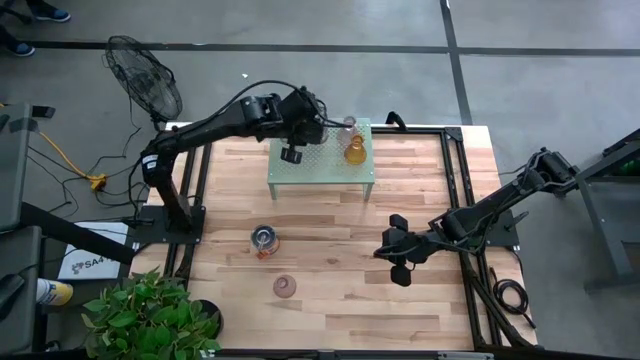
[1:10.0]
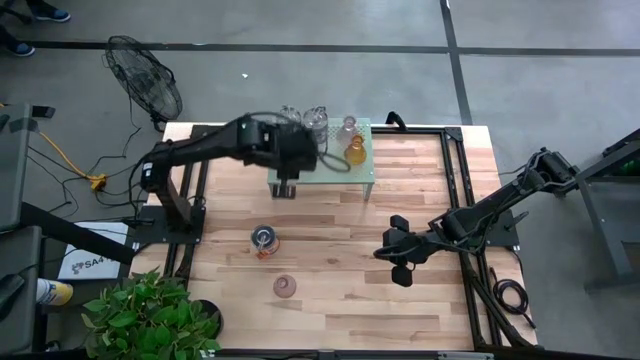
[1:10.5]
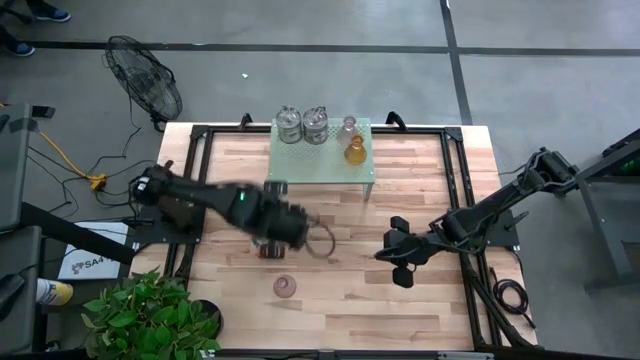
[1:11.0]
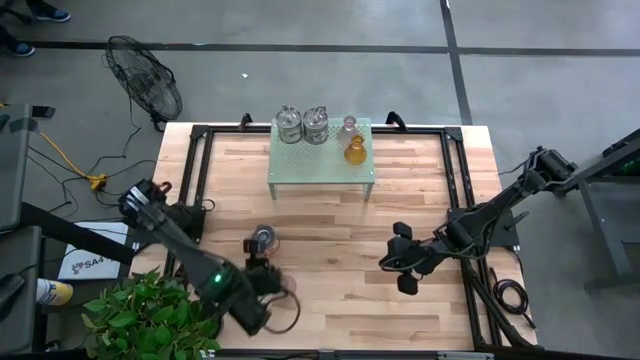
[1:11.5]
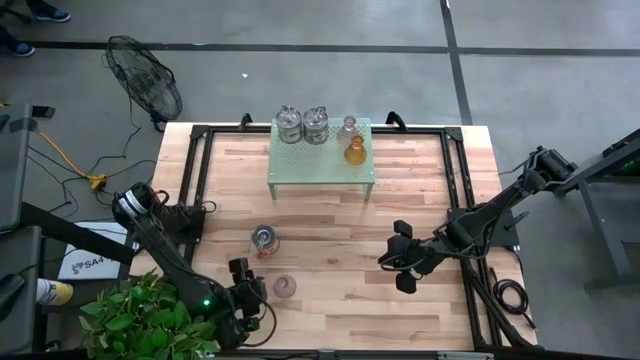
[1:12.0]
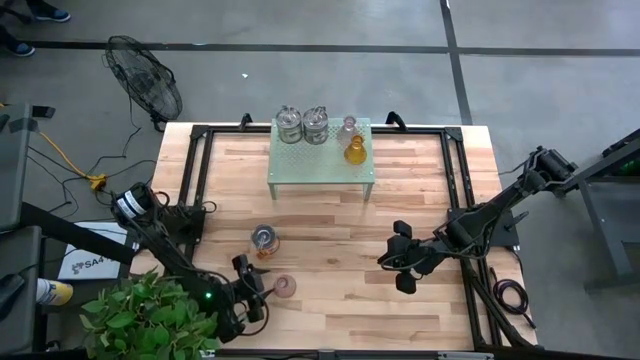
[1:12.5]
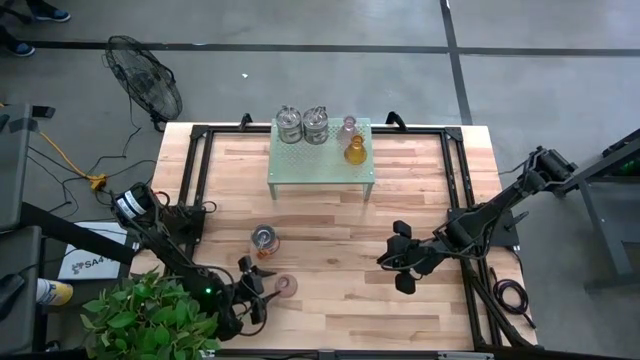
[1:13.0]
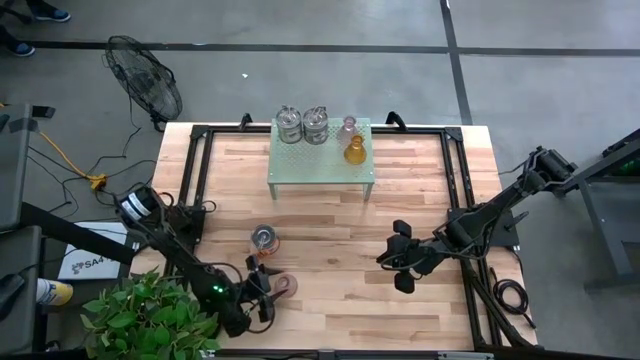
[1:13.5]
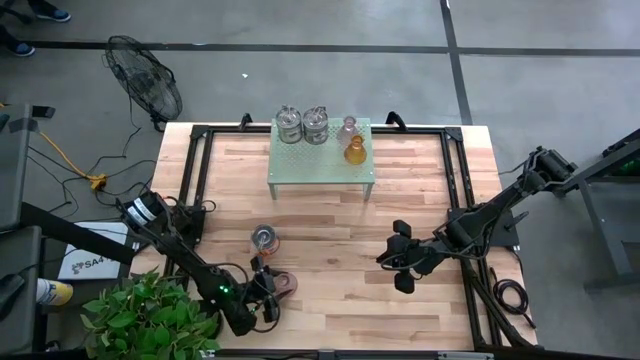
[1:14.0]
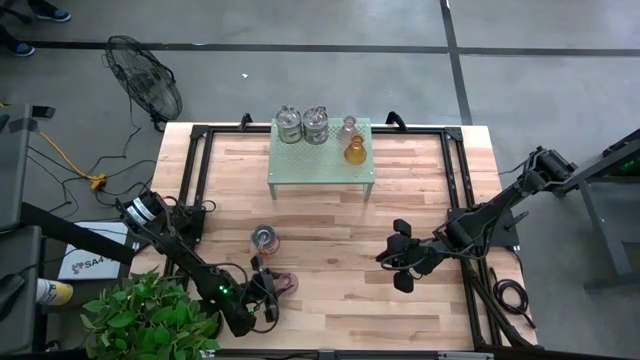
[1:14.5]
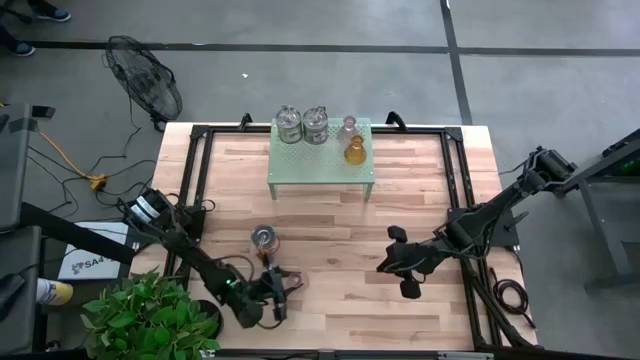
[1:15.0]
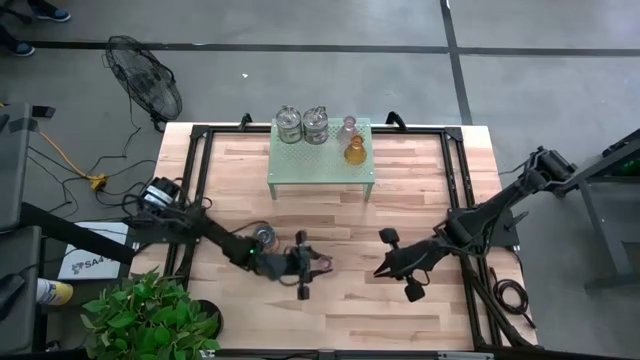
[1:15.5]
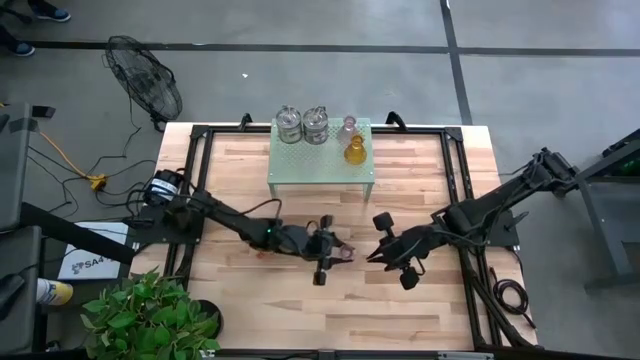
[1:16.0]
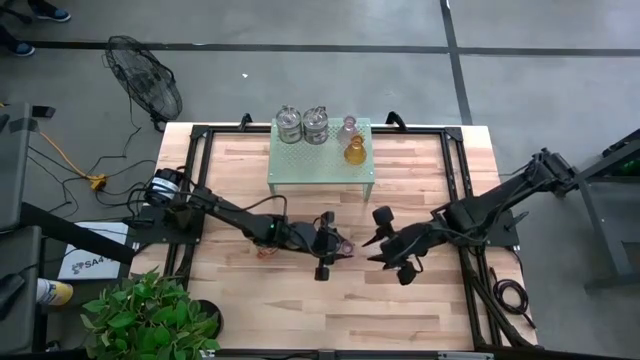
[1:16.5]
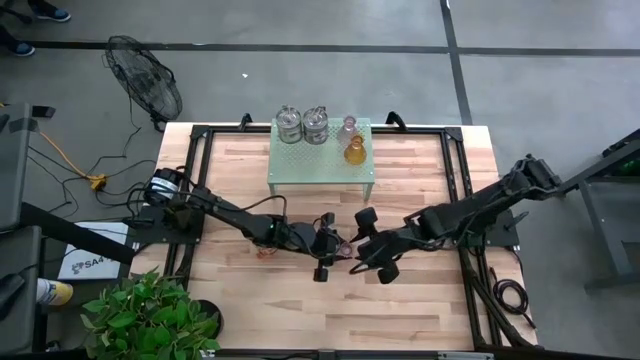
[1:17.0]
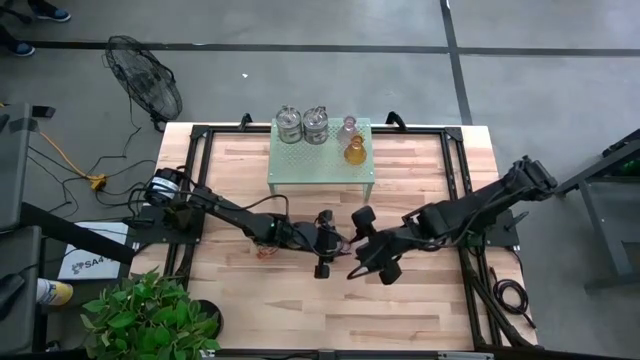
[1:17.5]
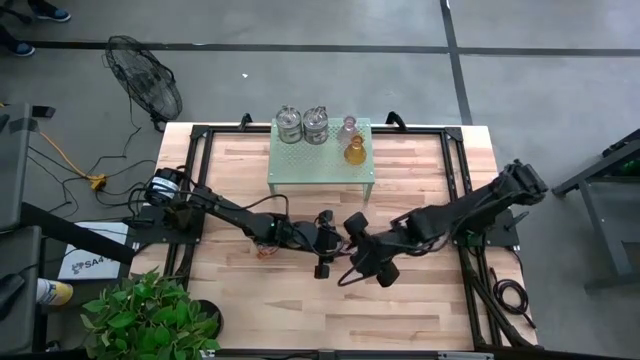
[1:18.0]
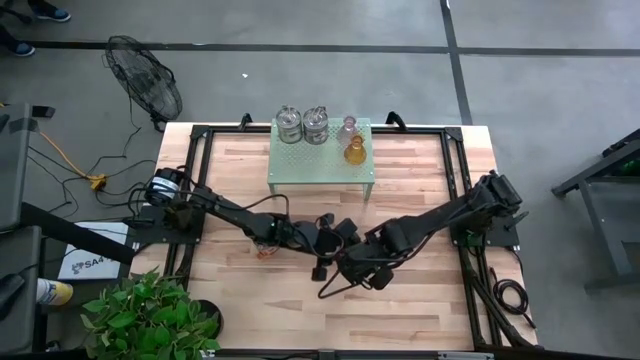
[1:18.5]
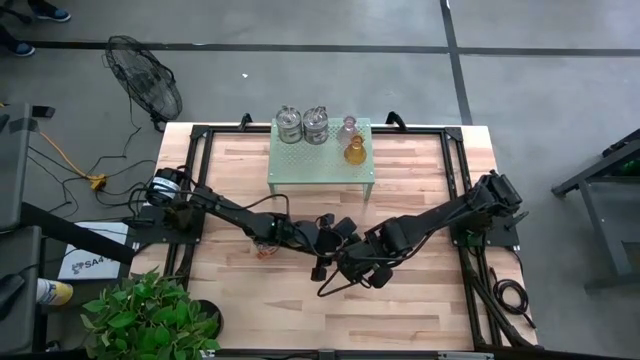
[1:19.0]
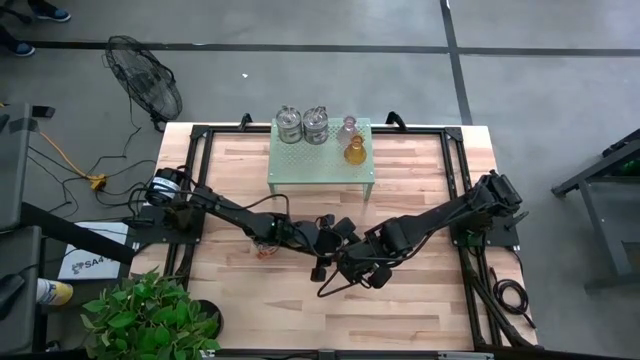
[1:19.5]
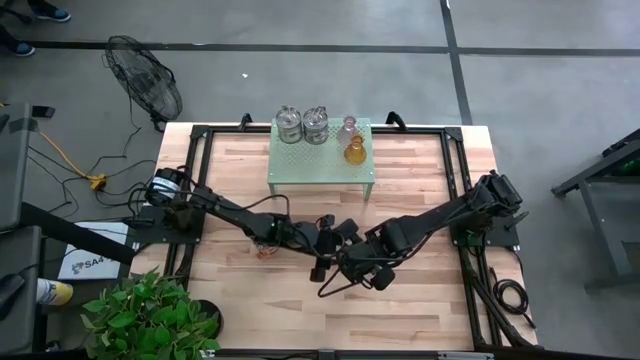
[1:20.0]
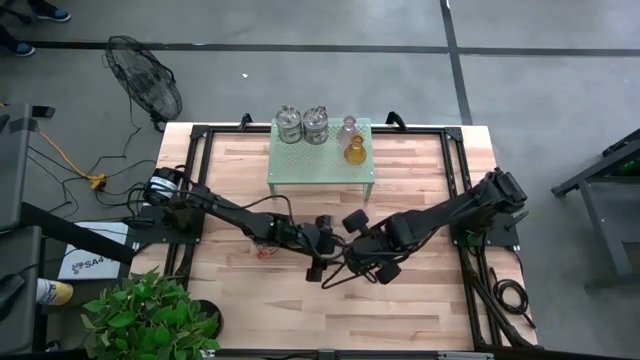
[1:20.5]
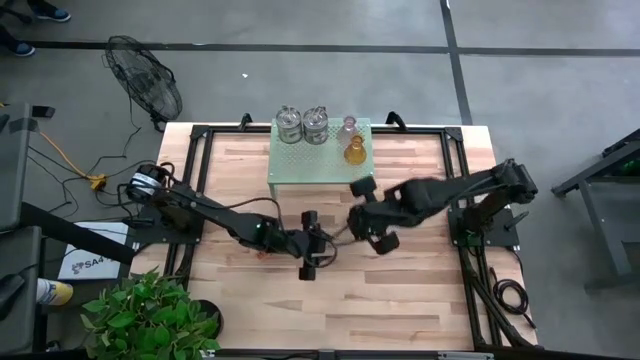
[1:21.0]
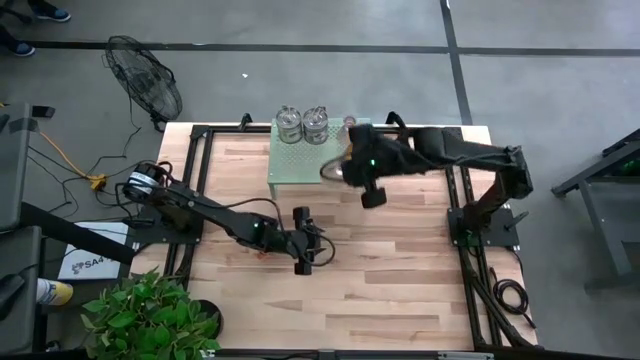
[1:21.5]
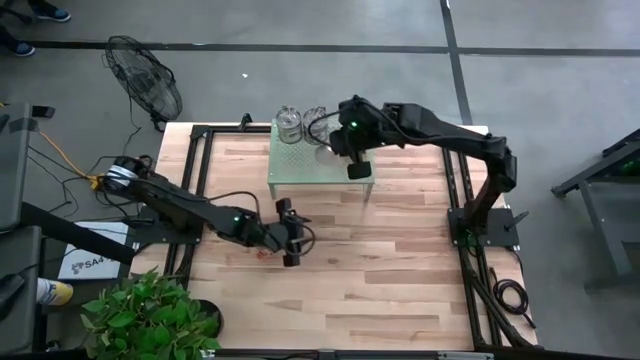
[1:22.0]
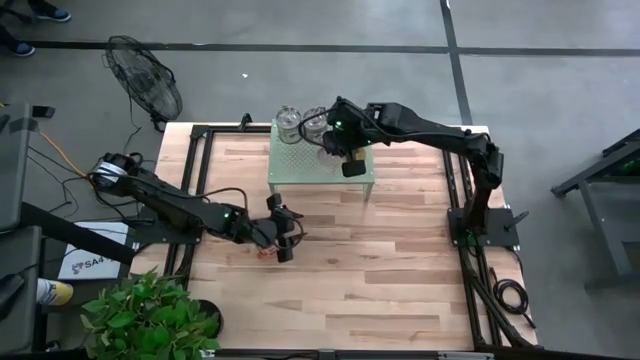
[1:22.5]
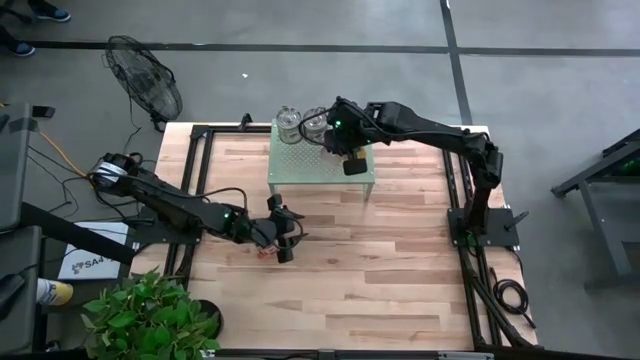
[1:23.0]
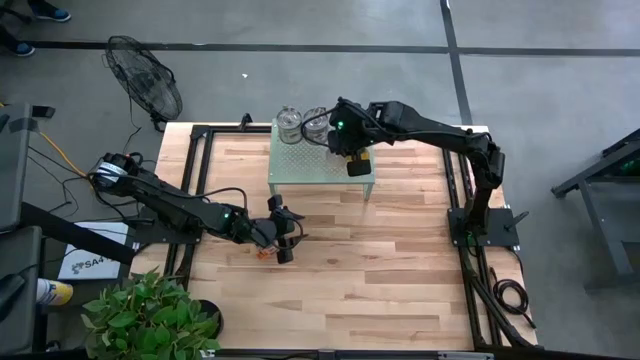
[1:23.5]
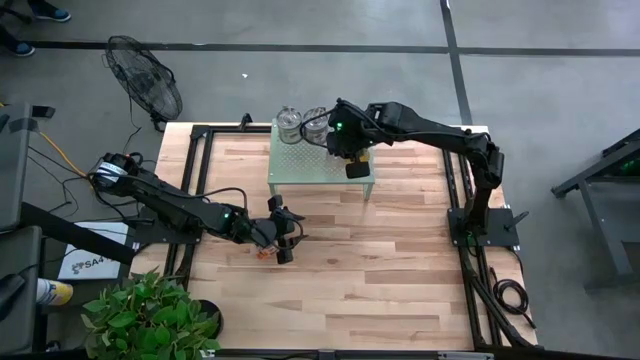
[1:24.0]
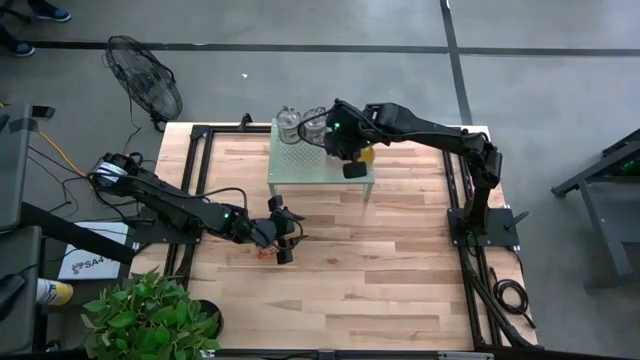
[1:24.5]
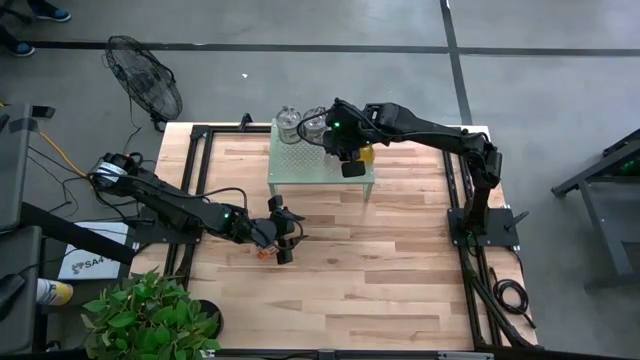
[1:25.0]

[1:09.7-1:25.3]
Task: Pick & Place candle stick holders
Put the pink glass candle holder on the shelf

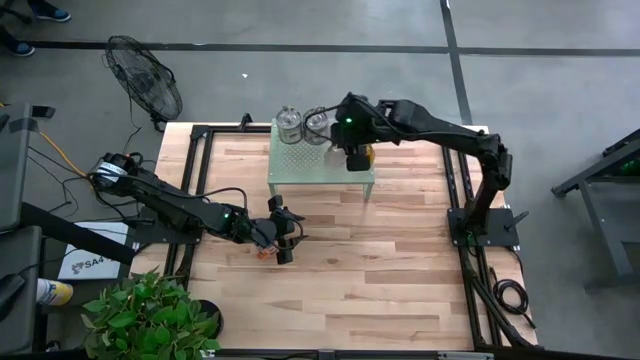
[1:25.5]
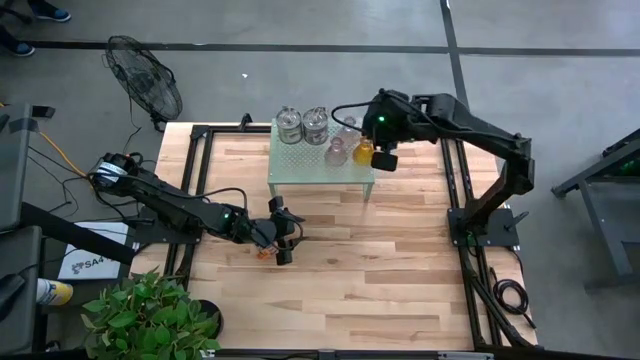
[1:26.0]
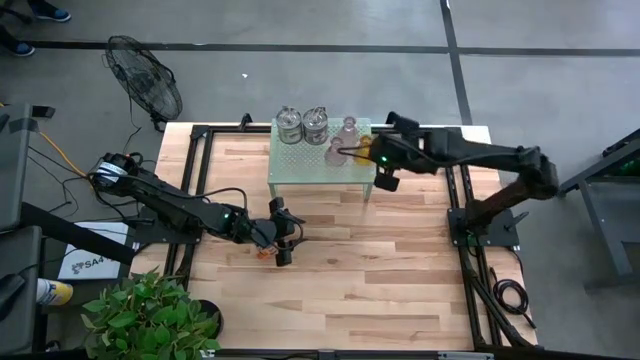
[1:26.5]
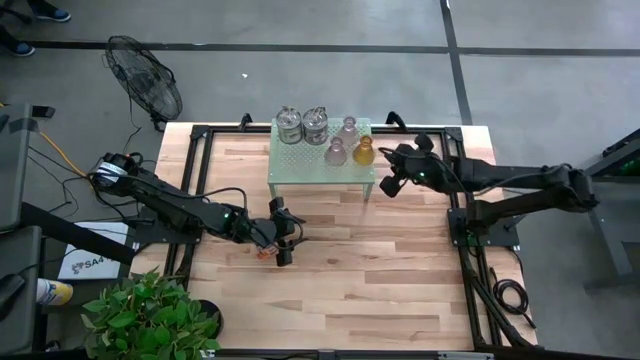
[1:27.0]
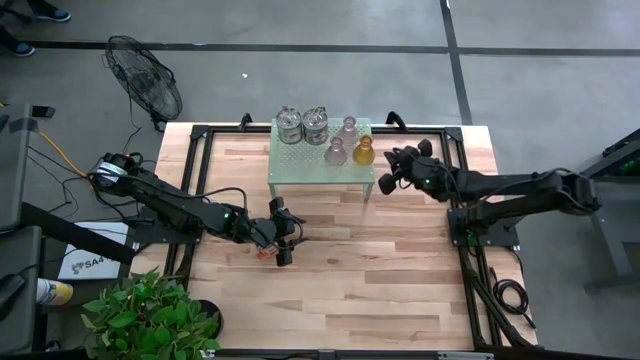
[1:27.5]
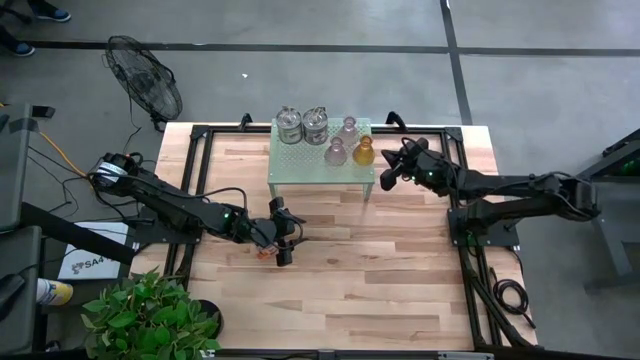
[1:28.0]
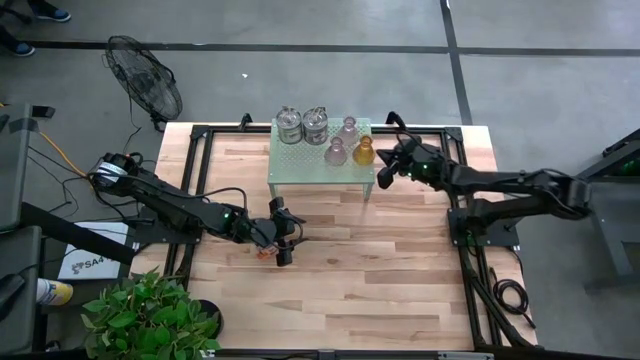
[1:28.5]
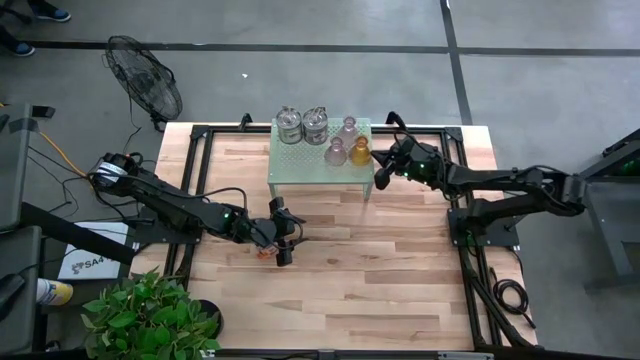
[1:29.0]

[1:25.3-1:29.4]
Adjust the yellow glass candle holder on the shelf

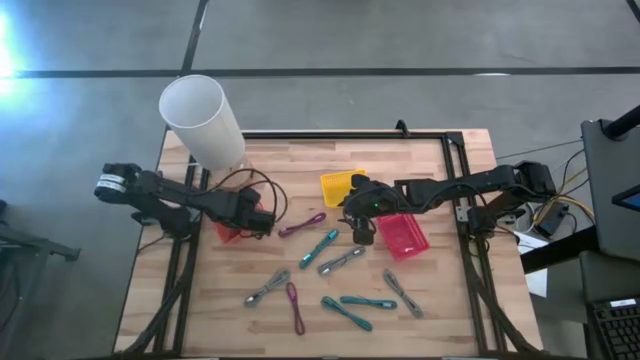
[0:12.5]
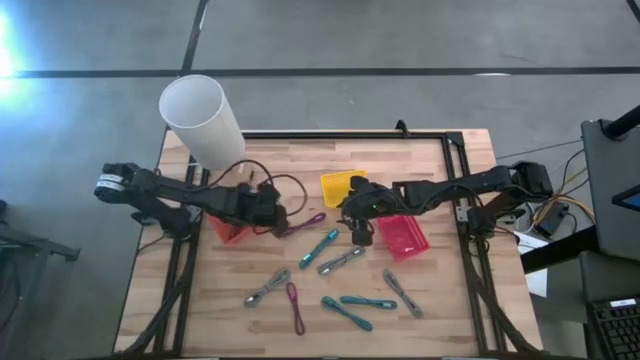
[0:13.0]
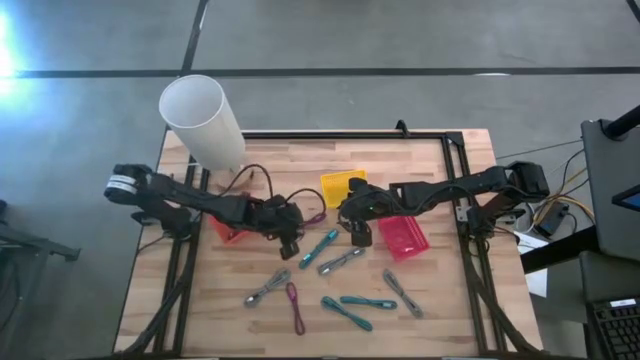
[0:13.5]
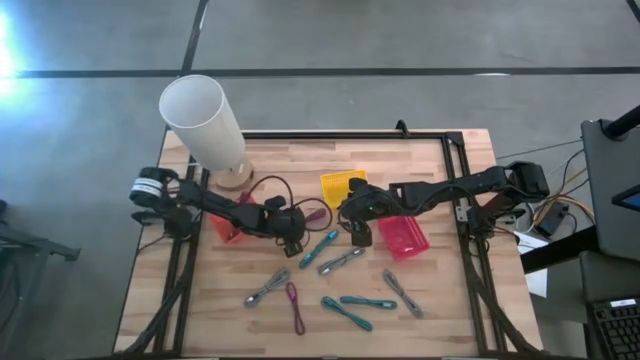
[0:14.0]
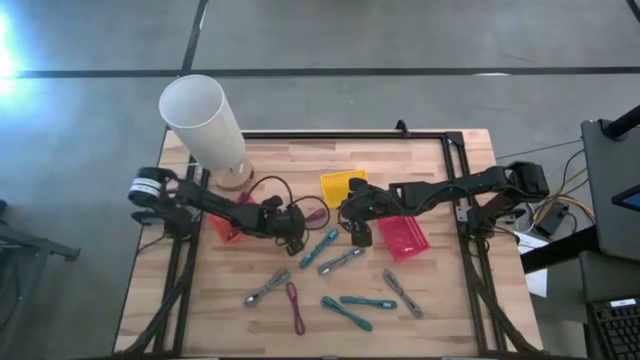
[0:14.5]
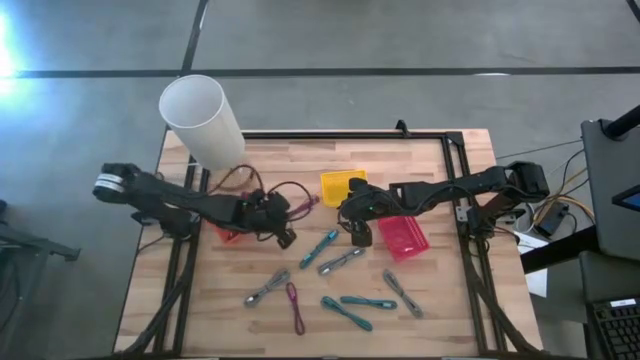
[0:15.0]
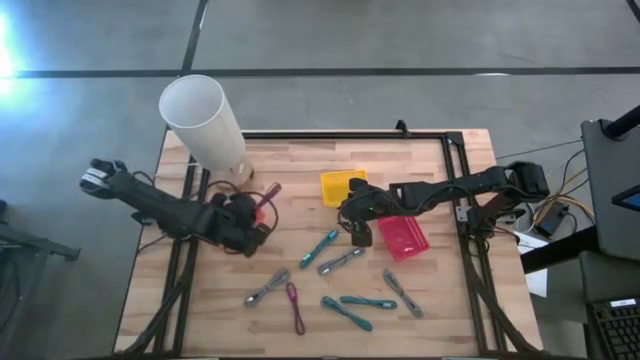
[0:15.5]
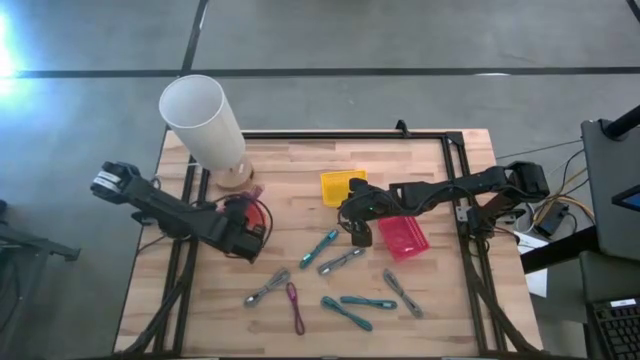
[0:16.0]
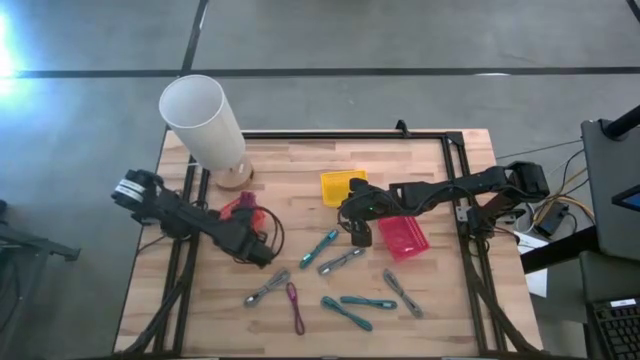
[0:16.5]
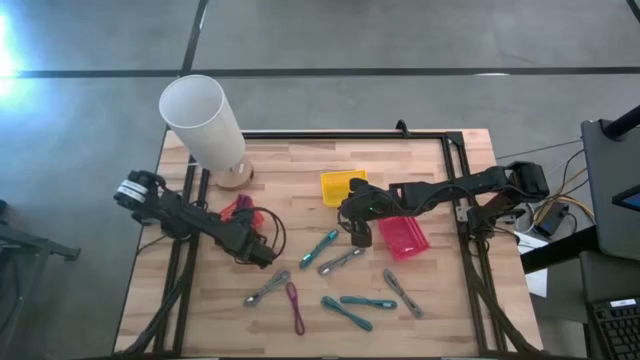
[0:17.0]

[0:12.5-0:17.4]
Task: Pick & Place USB Port
Put the top pink patterned charger cable into the orange bin
